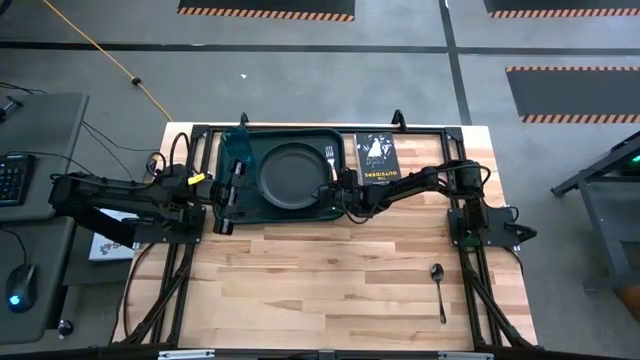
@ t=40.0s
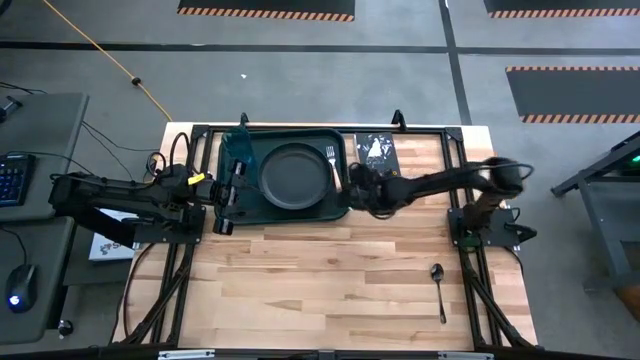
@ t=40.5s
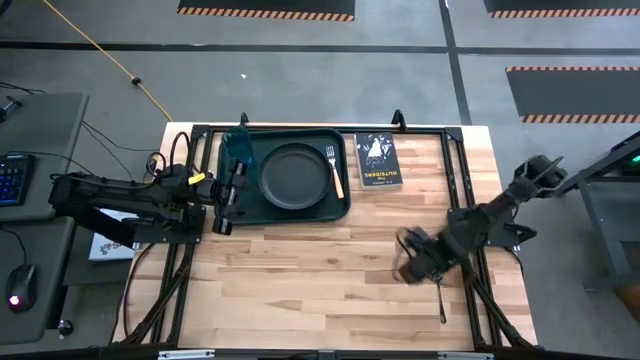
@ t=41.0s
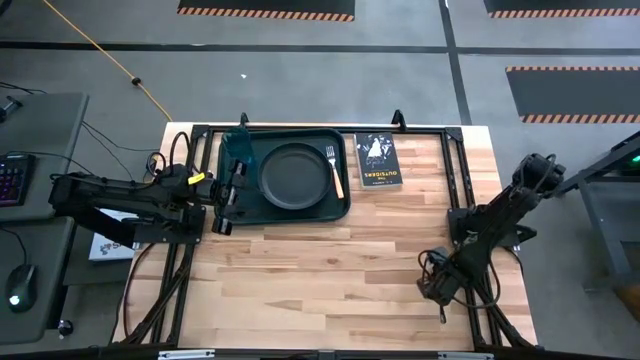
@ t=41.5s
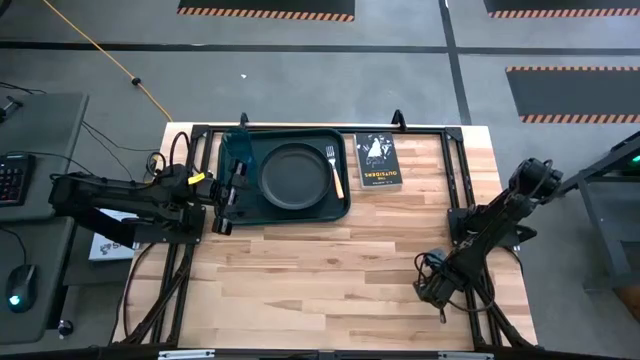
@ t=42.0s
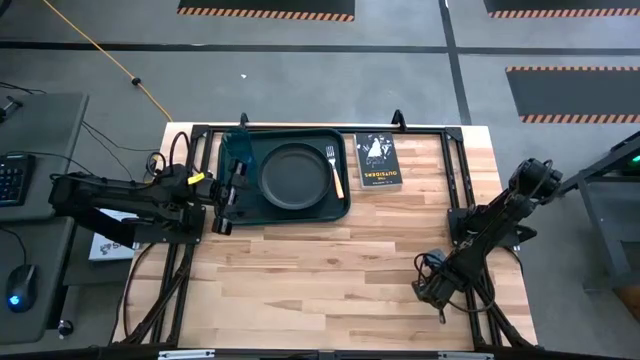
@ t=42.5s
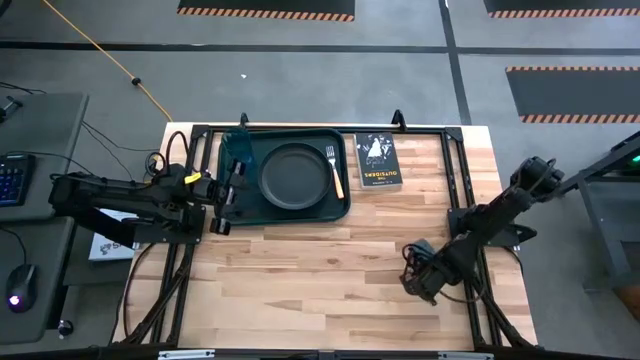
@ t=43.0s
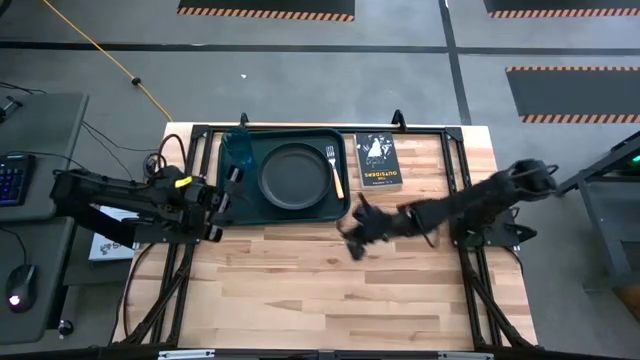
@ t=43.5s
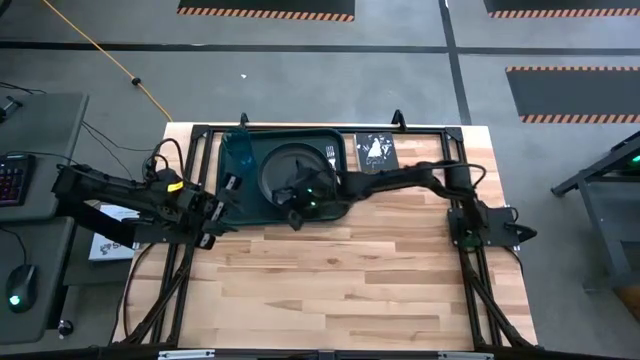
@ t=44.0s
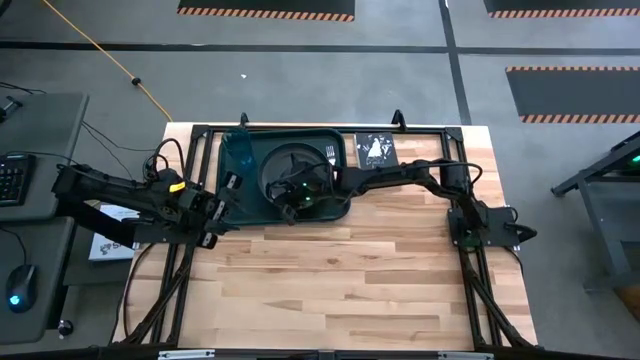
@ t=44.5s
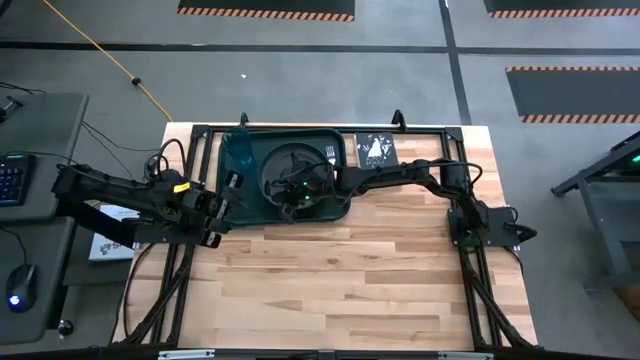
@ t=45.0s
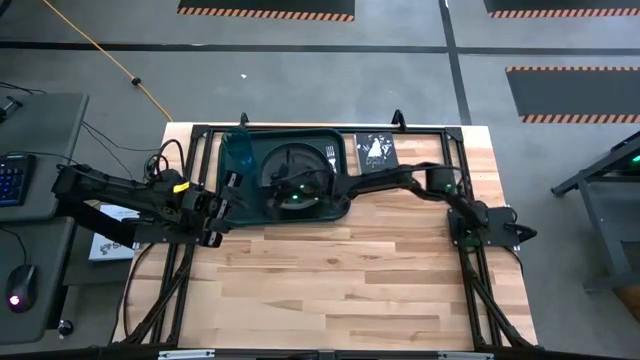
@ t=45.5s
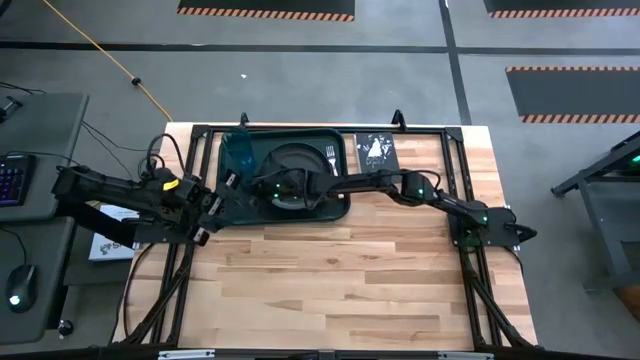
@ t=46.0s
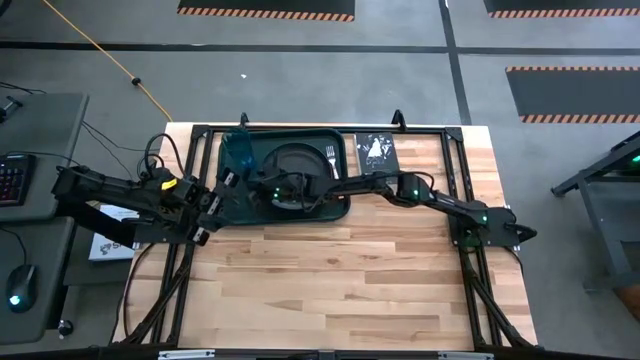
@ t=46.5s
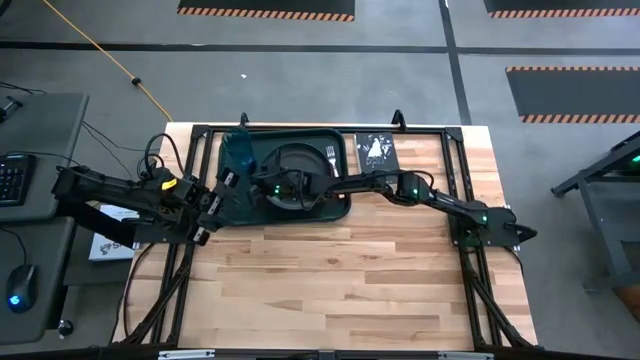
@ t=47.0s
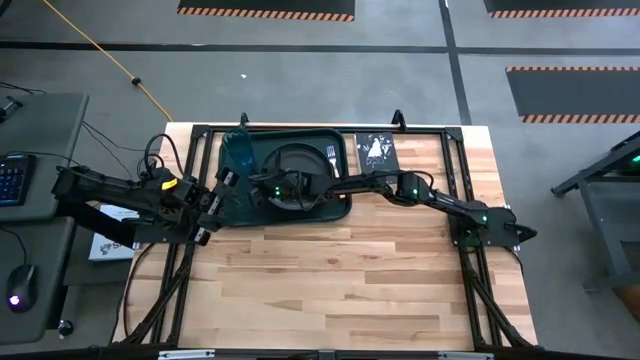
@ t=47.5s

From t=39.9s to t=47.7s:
Task: Pick and place plate/cup/fork/spoon on tray
Put the black spoon on the dark green tray

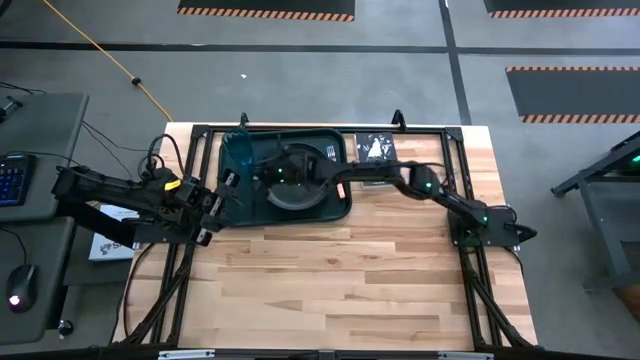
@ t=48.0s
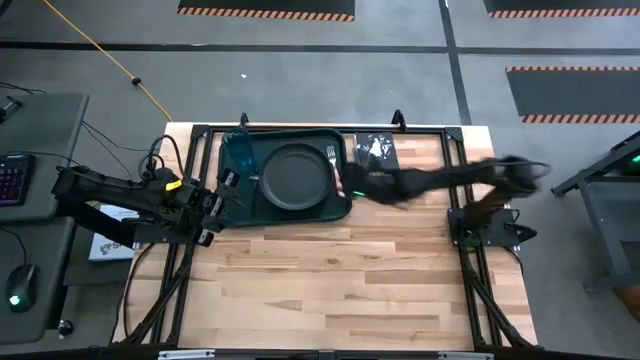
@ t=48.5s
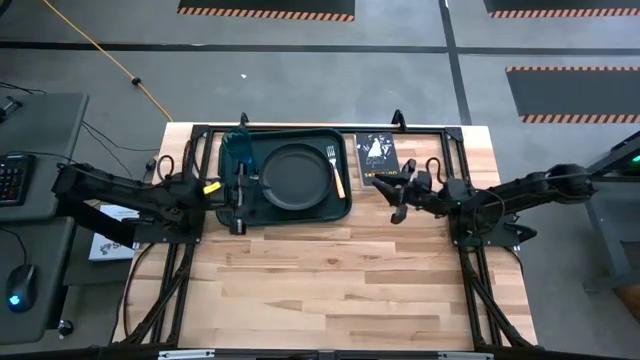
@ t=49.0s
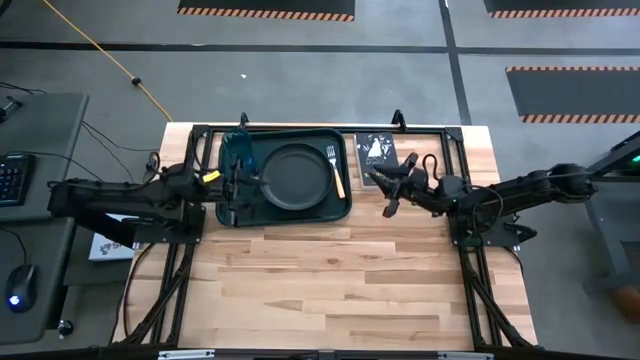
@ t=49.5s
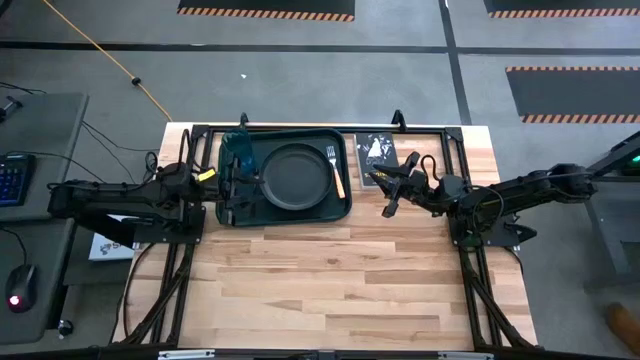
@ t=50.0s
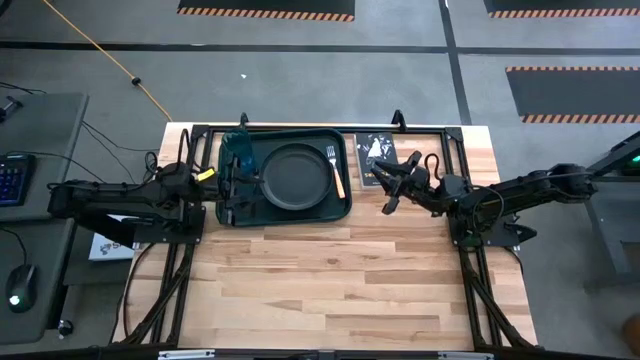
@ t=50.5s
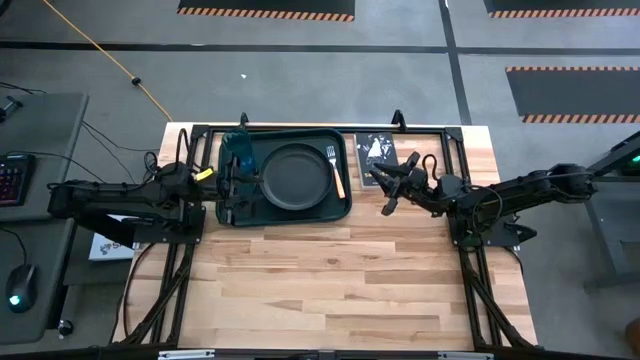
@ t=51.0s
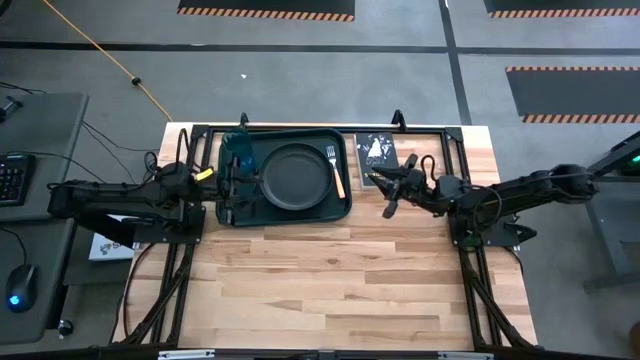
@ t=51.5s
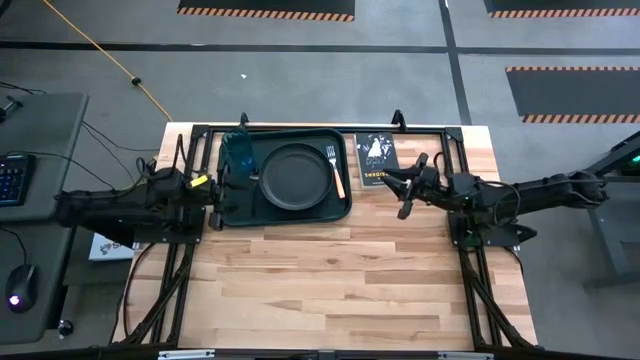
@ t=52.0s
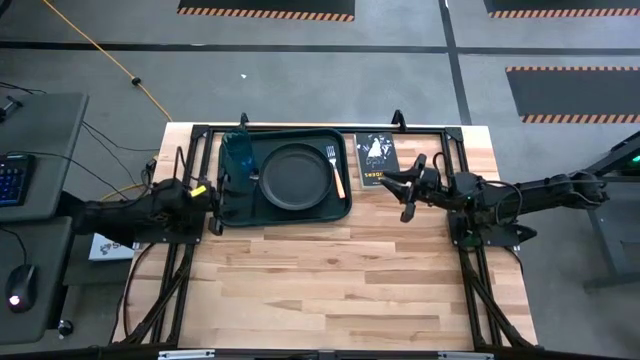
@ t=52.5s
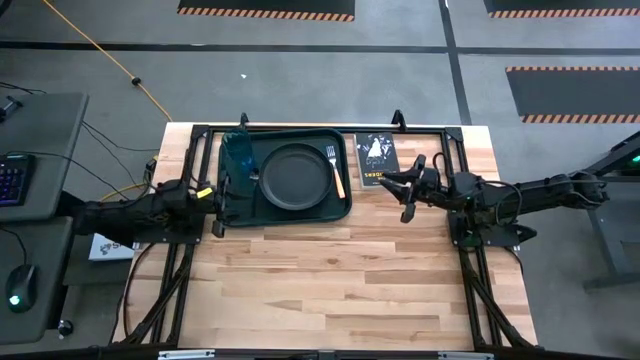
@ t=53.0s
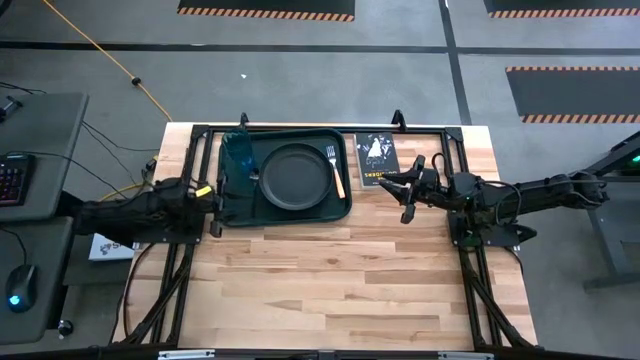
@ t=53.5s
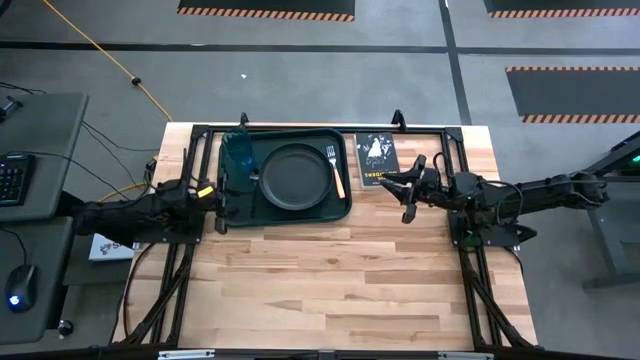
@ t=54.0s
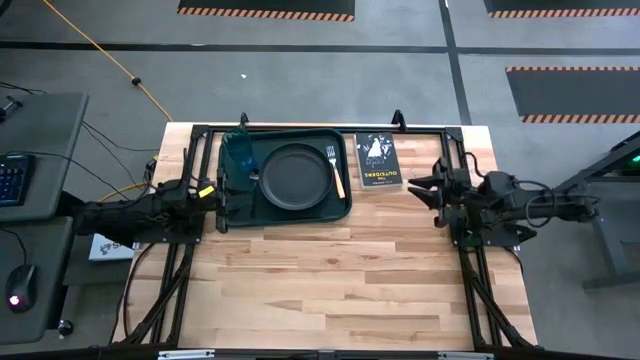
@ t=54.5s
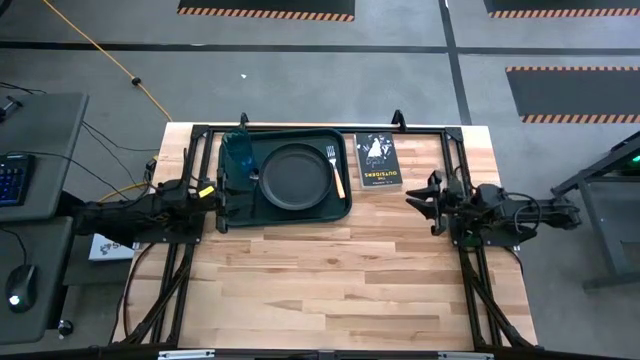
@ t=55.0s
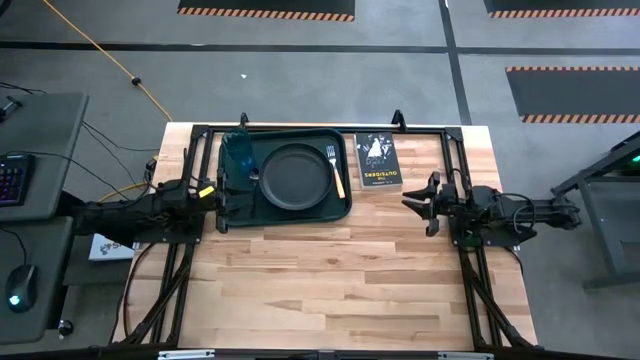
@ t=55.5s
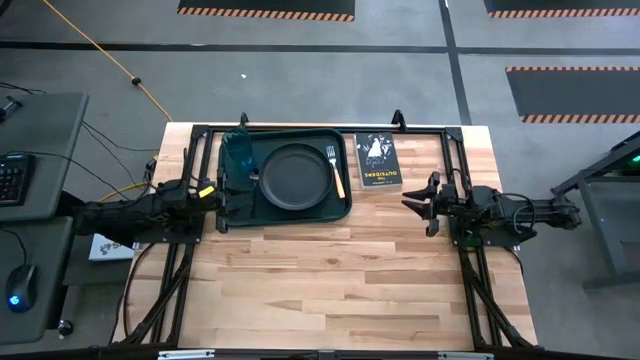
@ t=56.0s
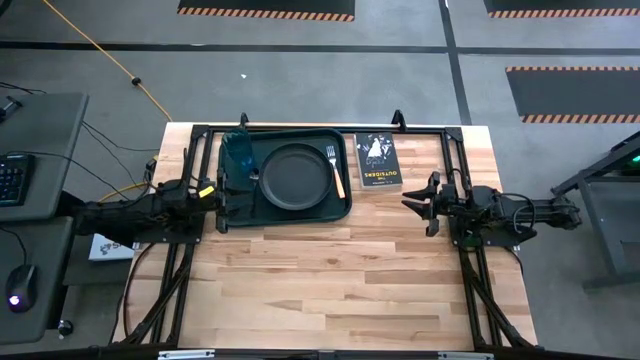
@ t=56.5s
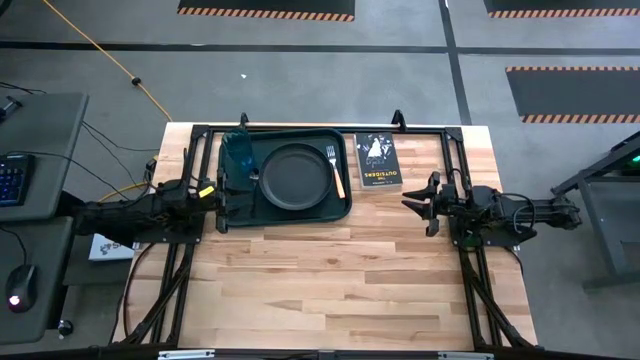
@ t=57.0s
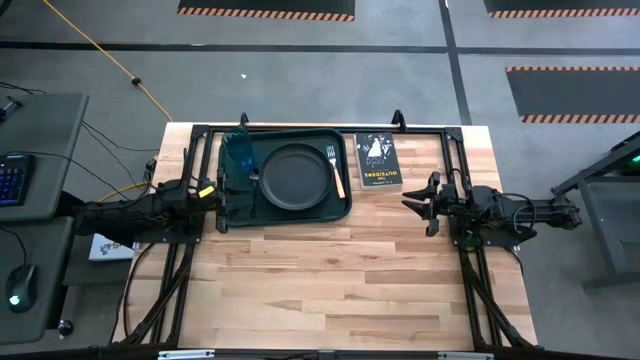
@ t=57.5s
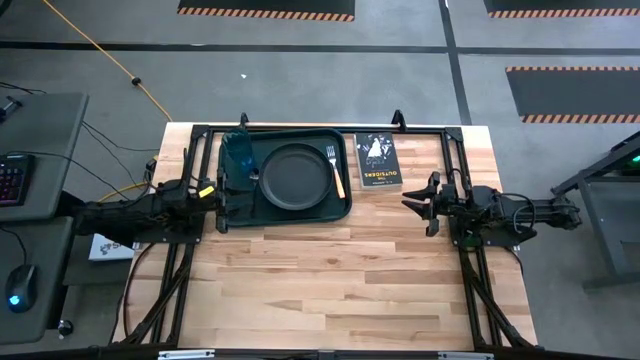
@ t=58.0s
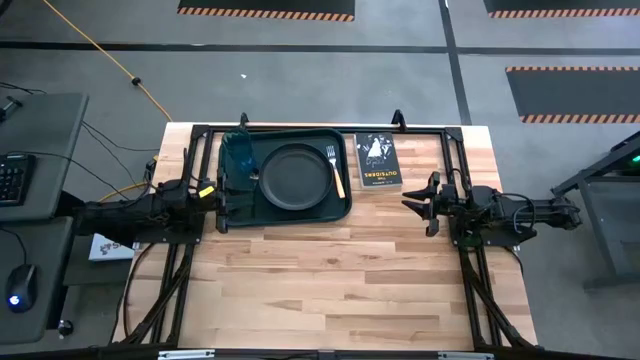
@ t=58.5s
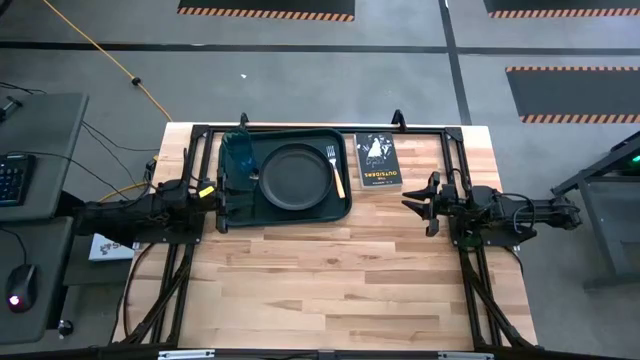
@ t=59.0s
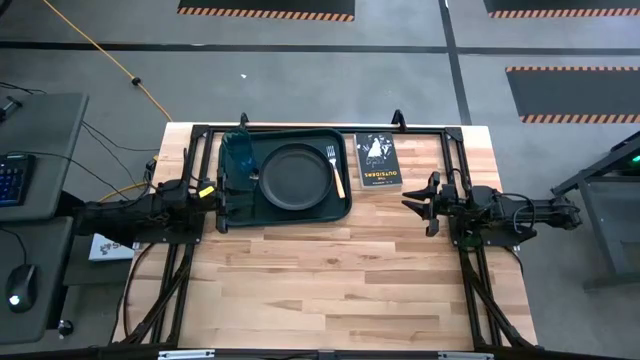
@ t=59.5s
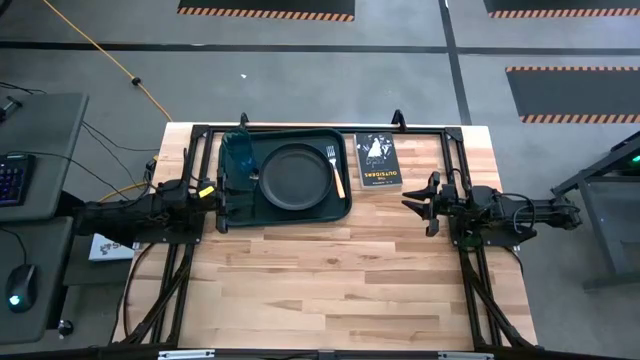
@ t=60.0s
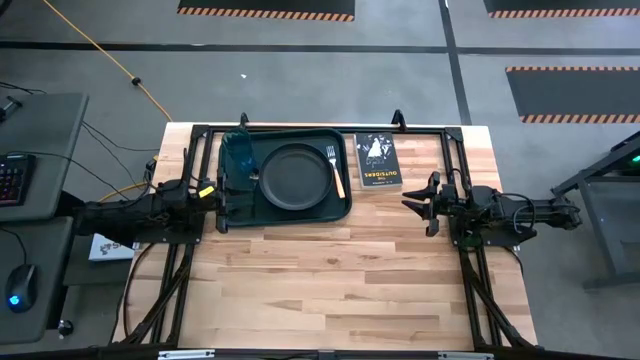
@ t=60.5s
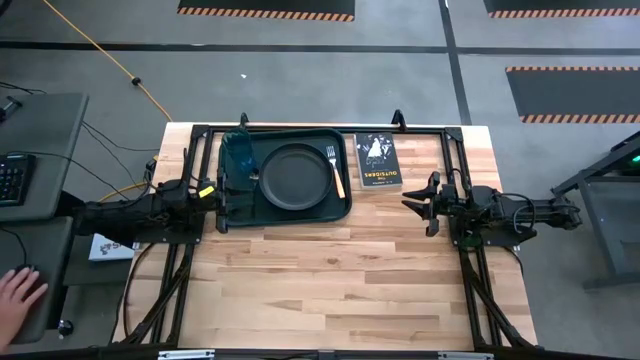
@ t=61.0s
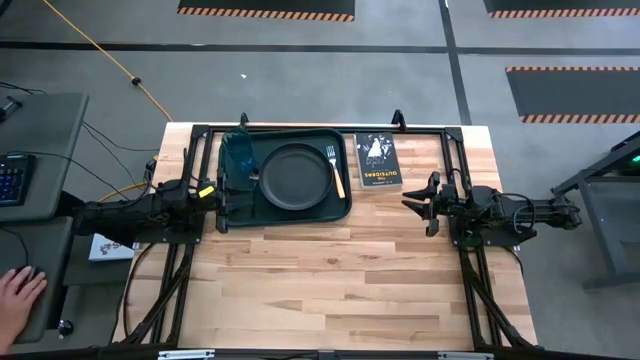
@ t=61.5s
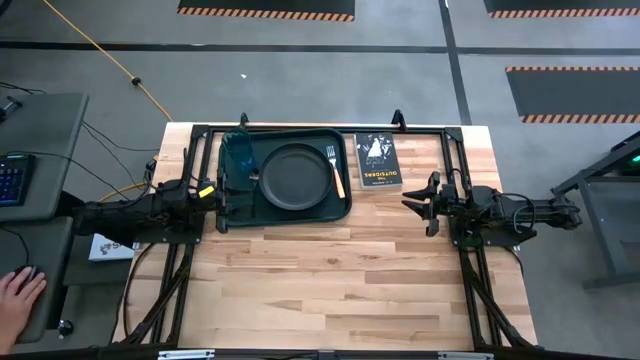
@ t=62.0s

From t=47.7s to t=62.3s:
Return to Home Position
